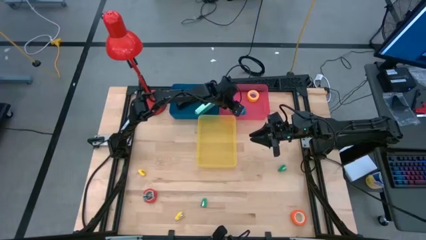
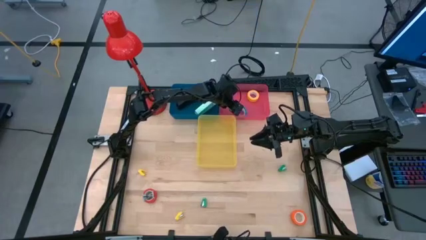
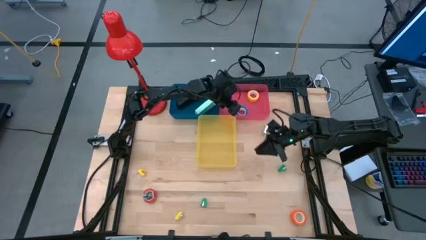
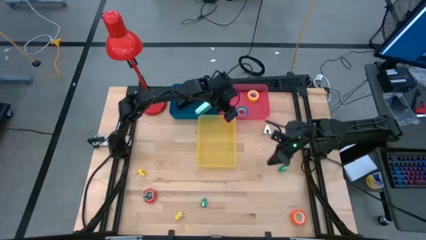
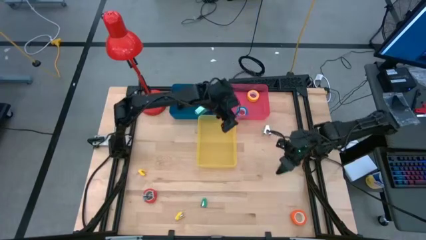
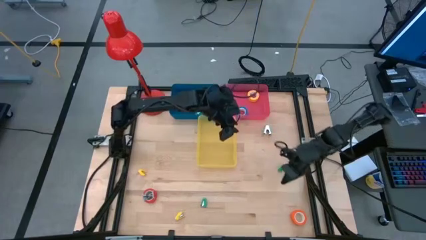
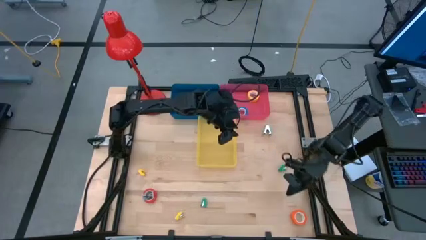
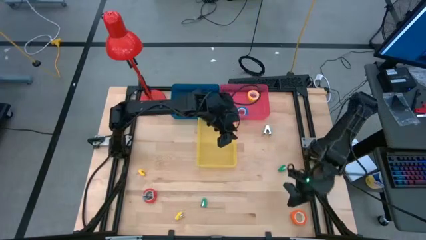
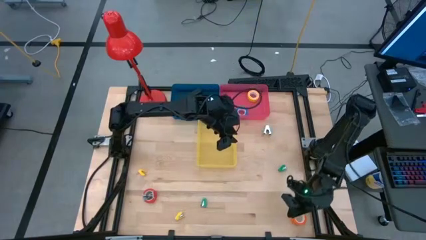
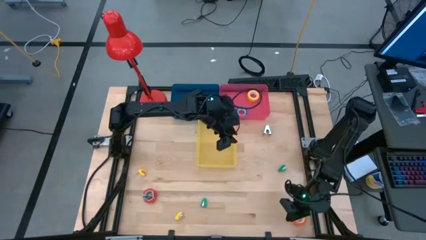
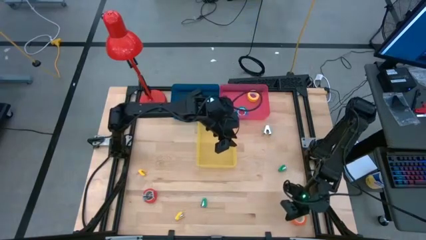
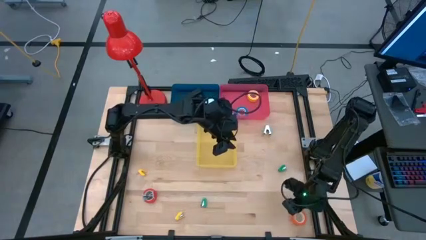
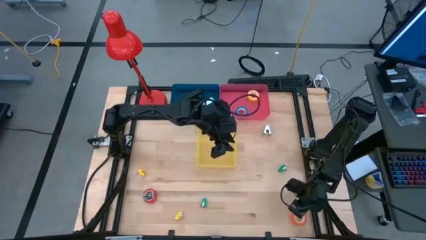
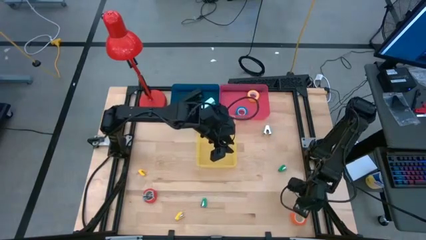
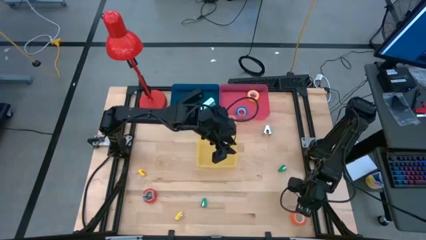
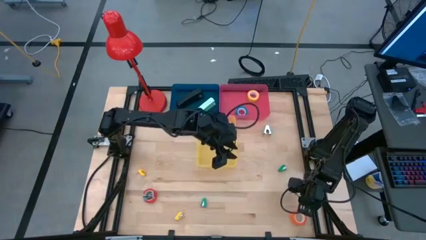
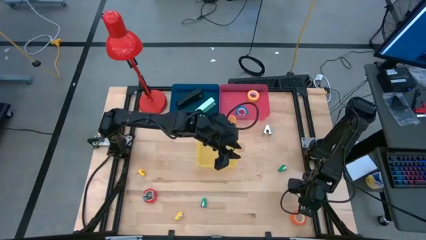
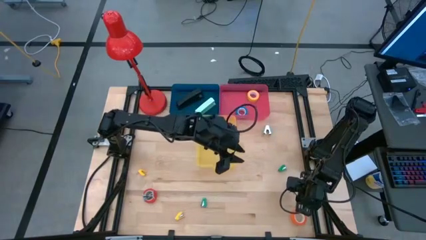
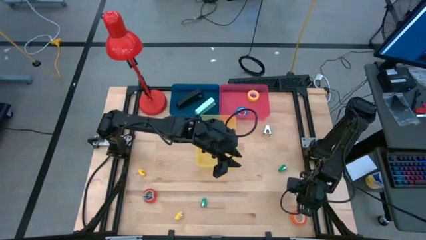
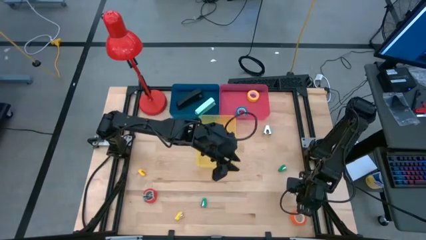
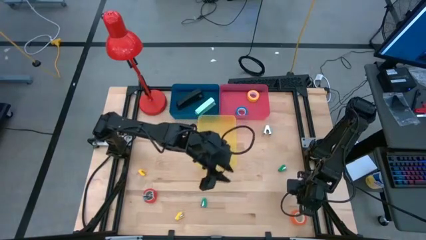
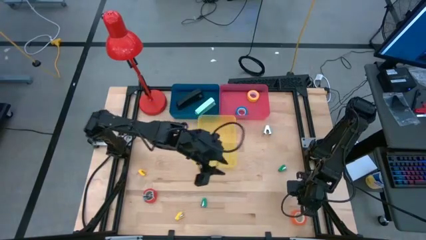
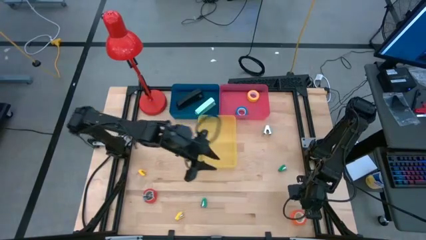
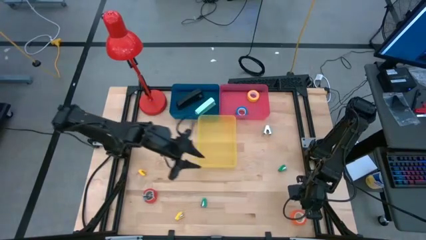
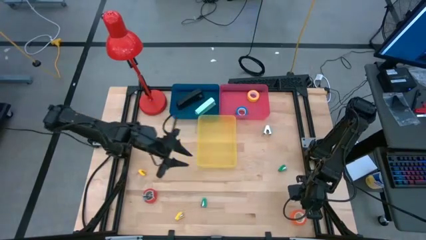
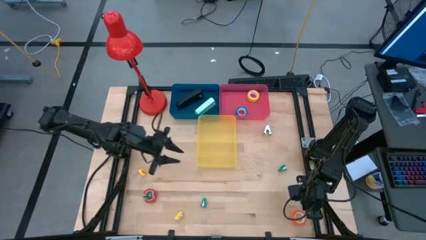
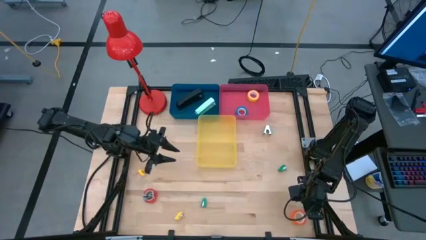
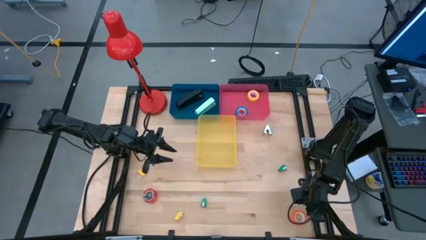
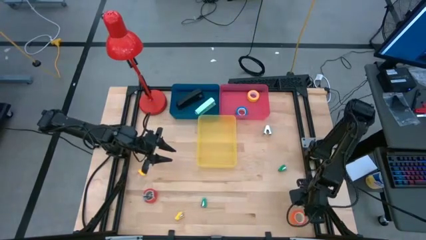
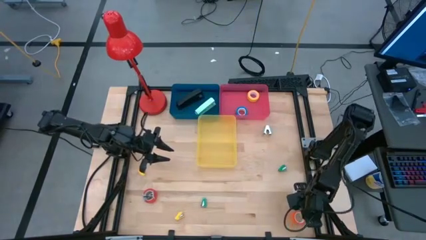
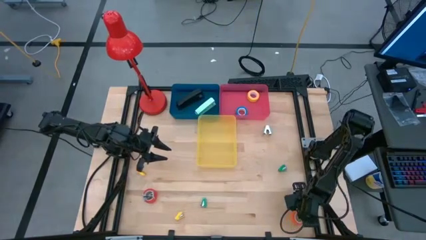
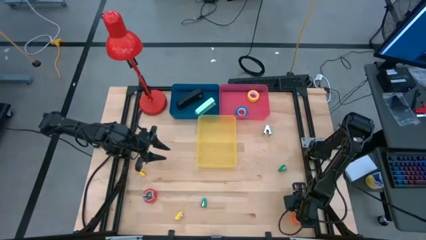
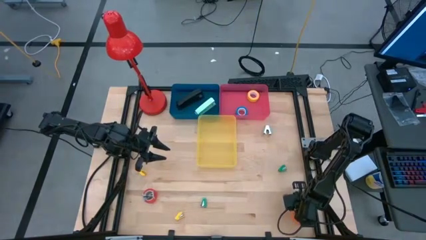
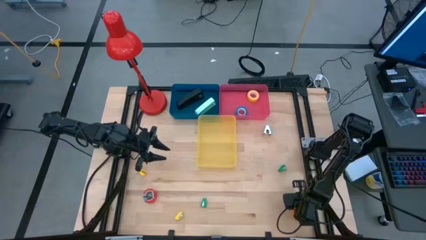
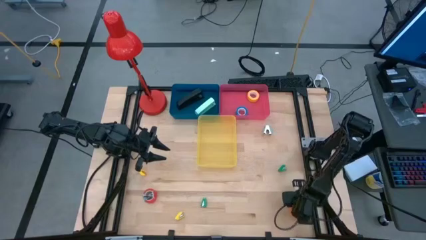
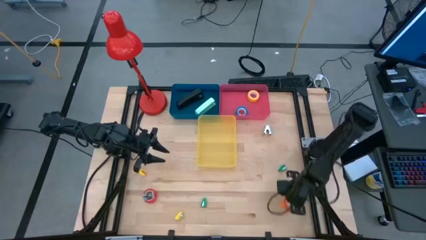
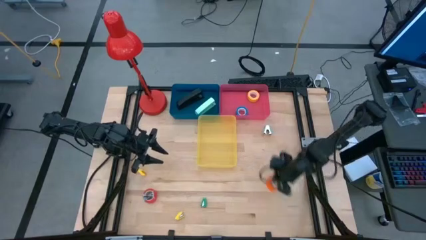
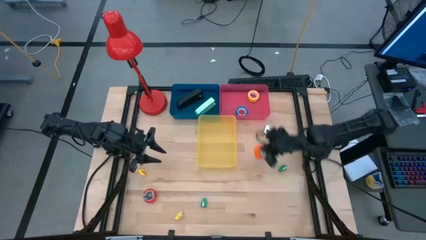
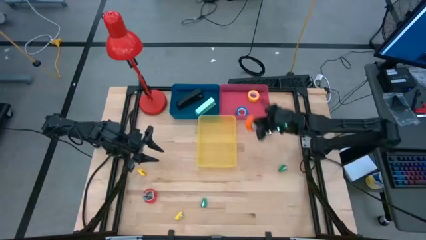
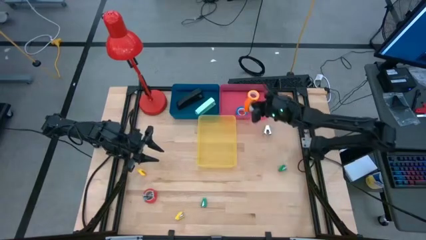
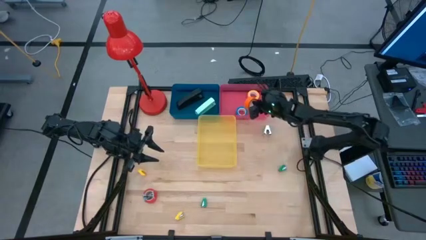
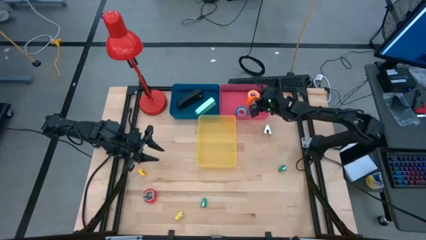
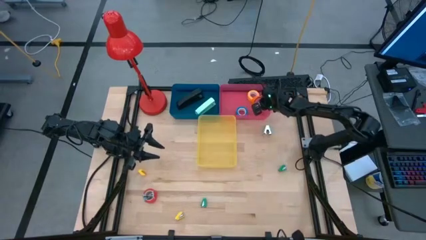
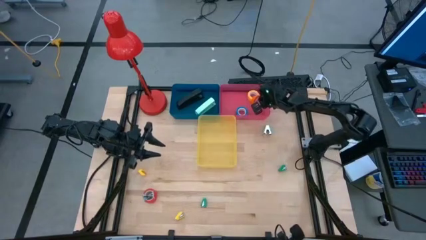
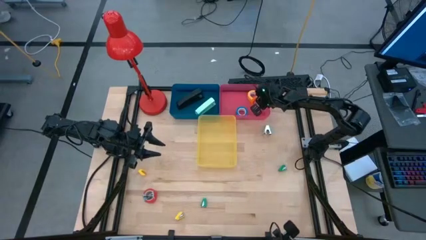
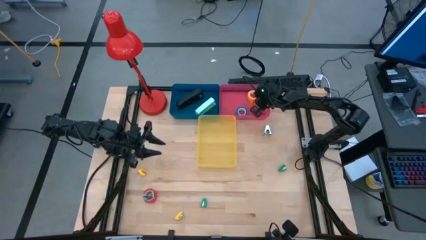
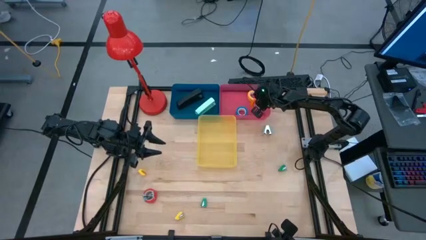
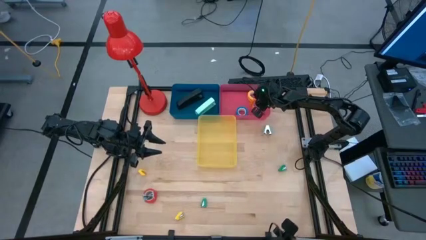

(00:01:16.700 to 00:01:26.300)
Task: Pick and place Stapler, Stapler remover, tape
Put the orange tape into the pink bin

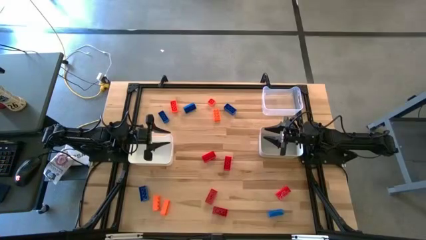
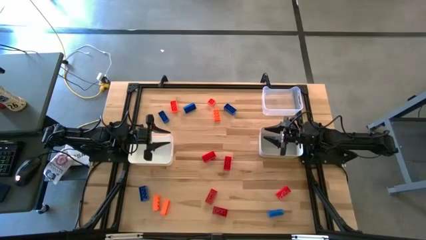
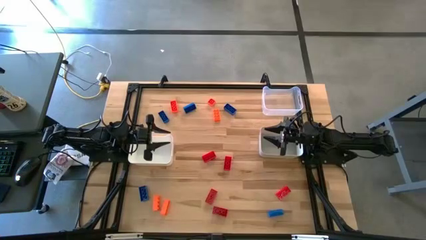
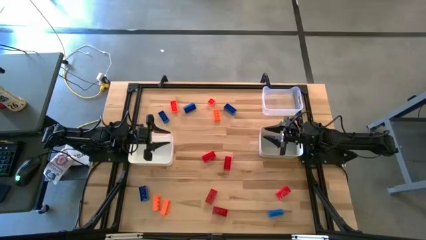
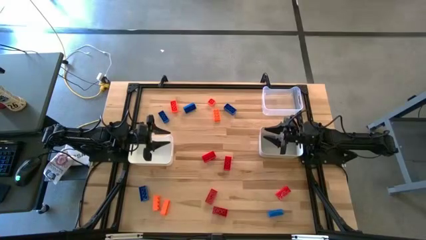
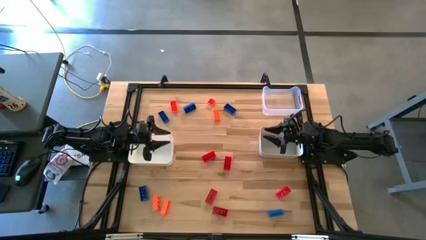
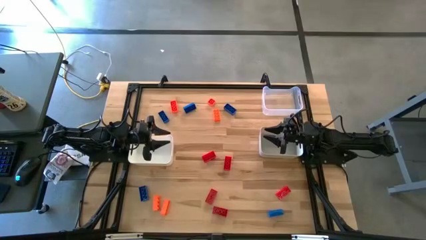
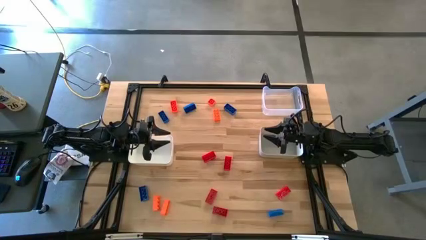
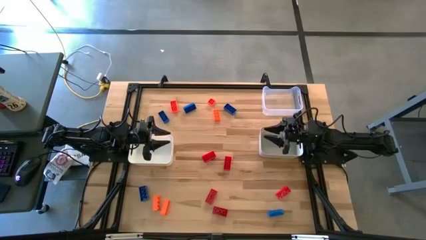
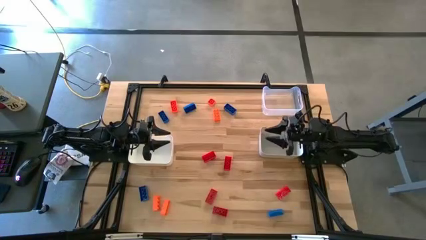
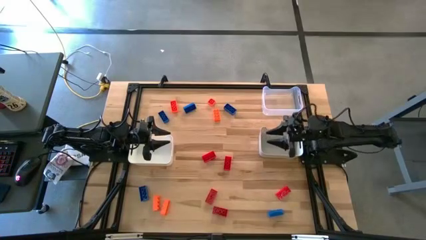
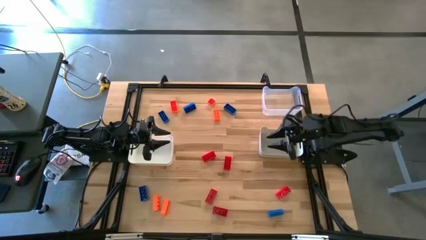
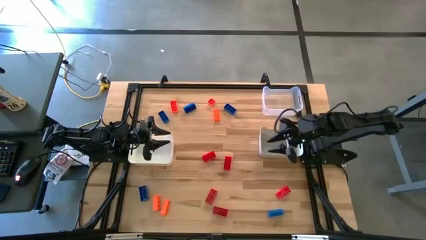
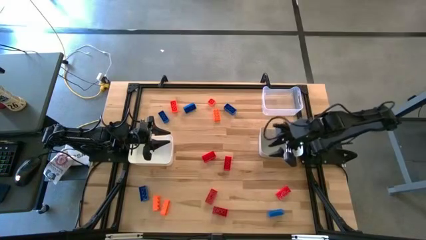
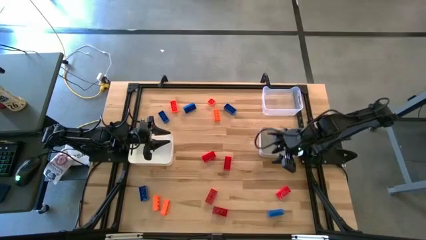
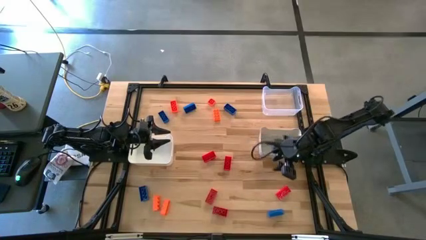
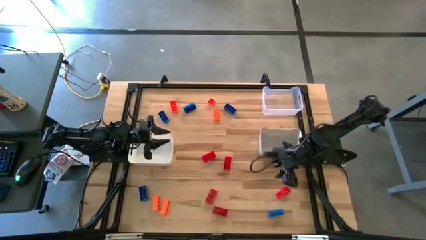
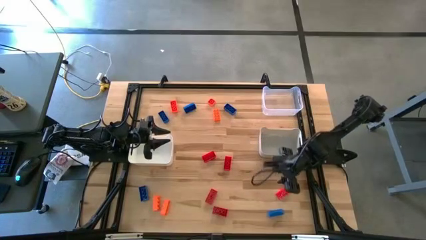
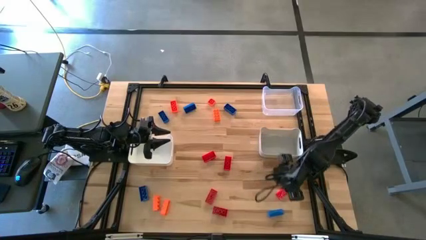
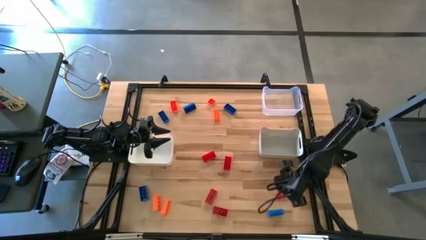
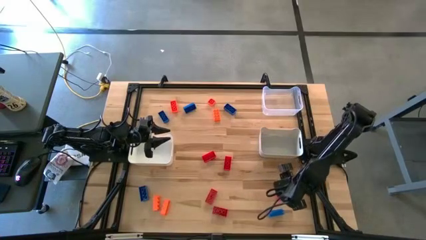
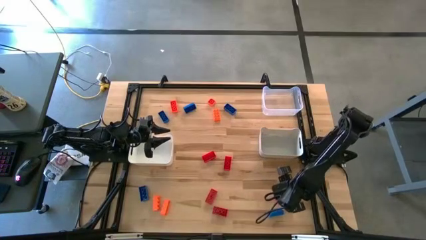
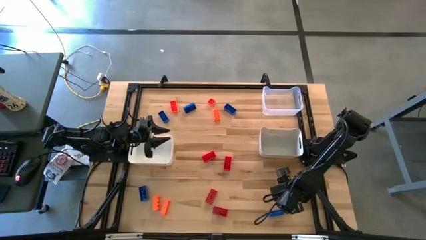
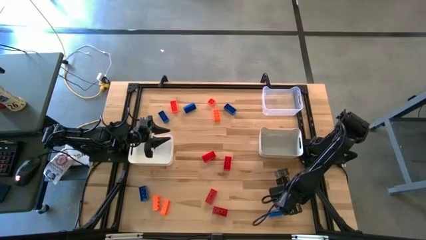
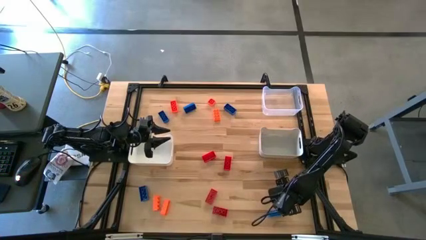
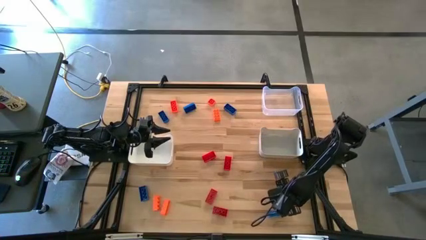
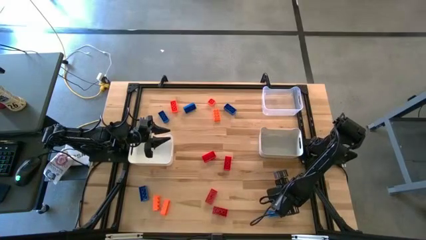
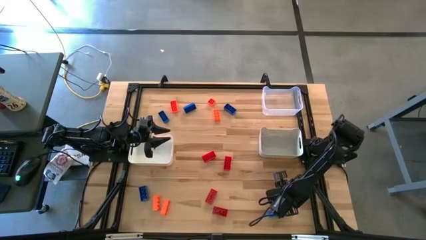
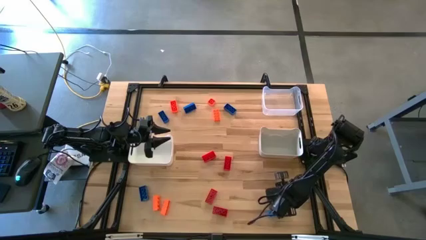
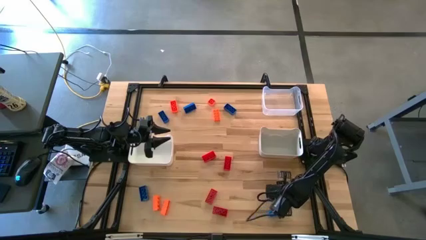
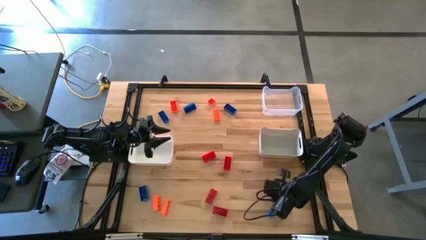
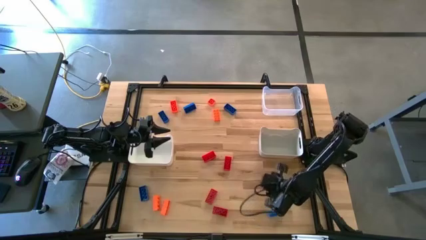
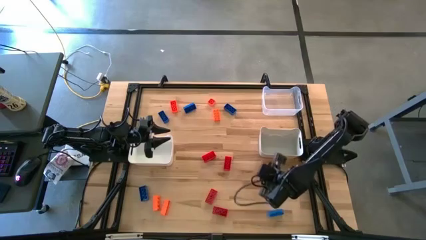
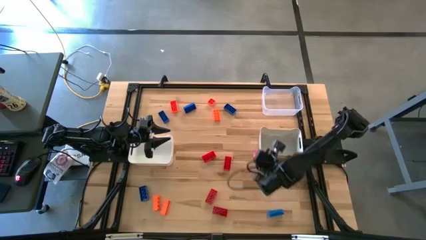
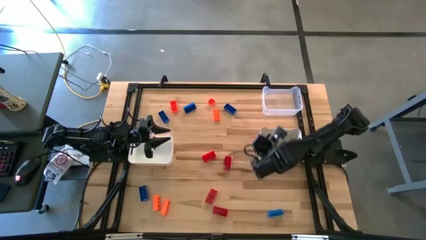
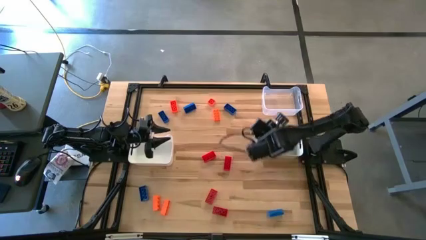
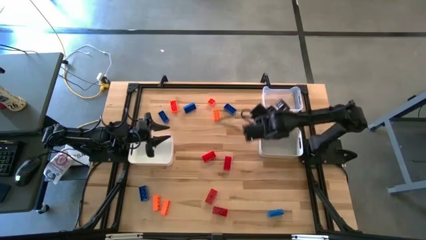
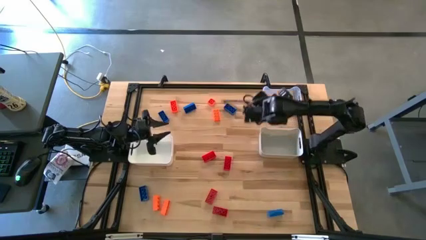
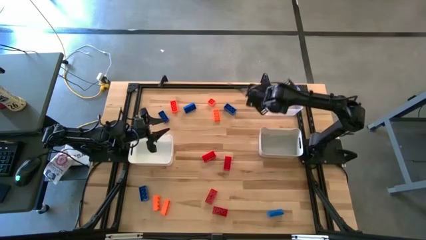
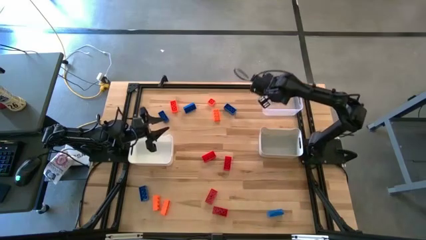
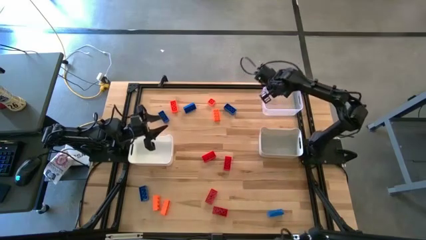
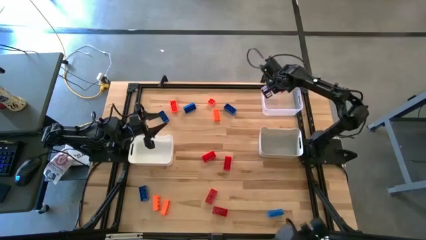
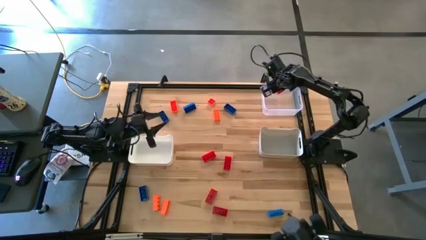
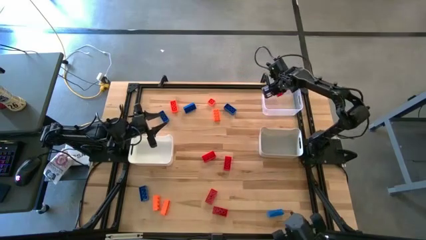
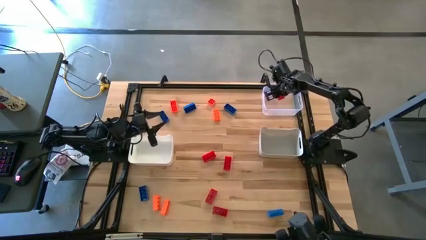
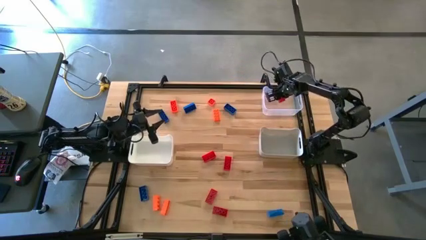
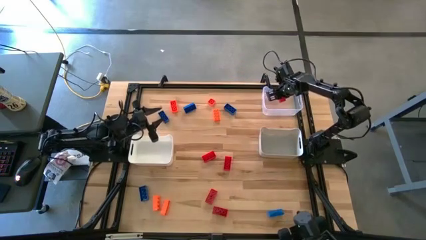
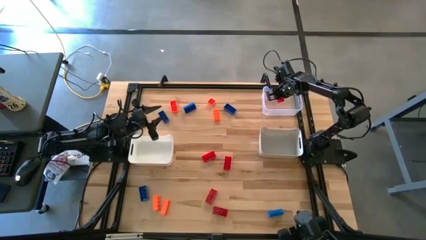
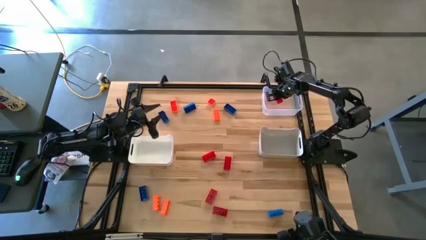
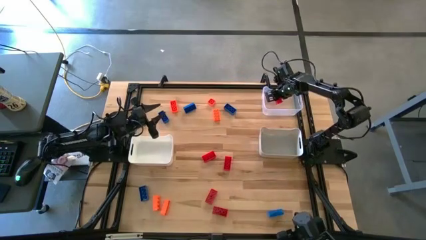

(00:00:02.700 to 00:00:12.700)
Task: Sort & place blocks by color
Put the red game piece into the transparent bin
